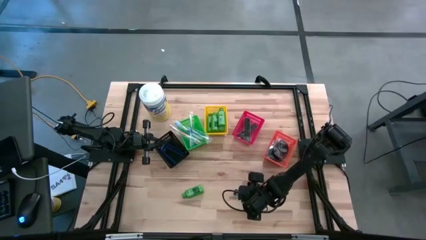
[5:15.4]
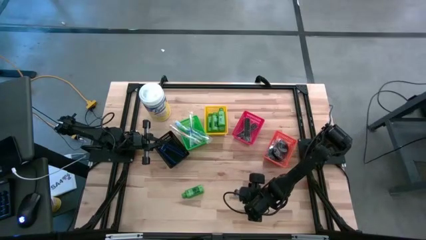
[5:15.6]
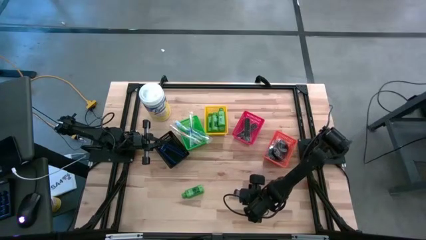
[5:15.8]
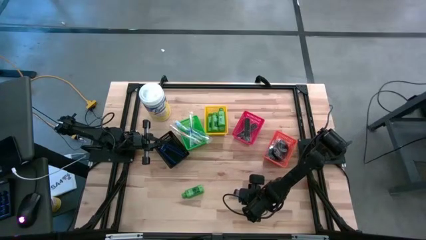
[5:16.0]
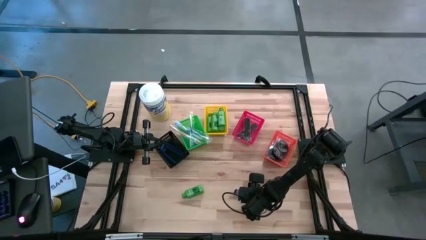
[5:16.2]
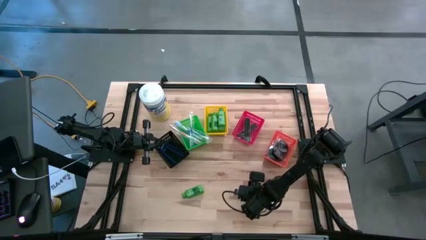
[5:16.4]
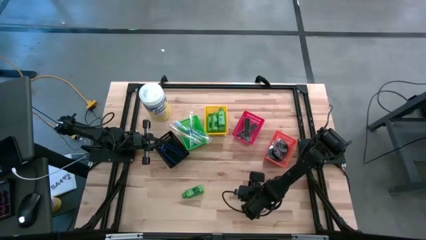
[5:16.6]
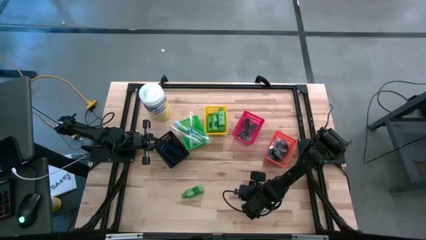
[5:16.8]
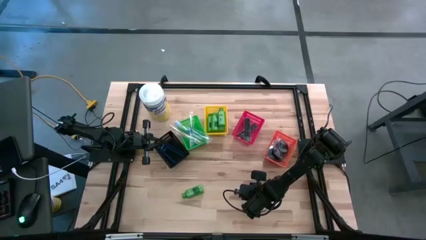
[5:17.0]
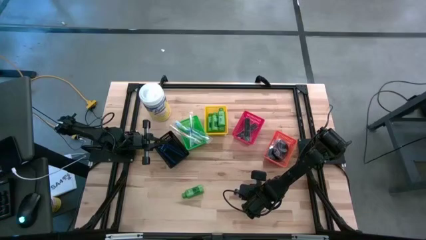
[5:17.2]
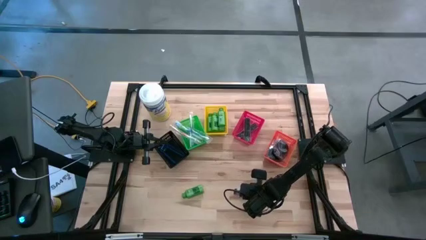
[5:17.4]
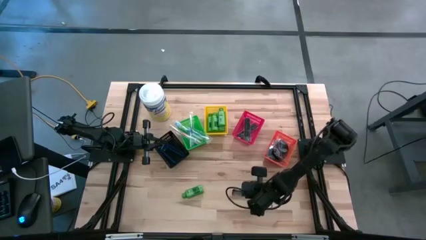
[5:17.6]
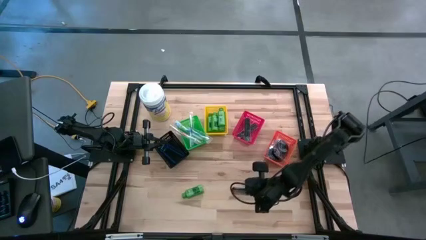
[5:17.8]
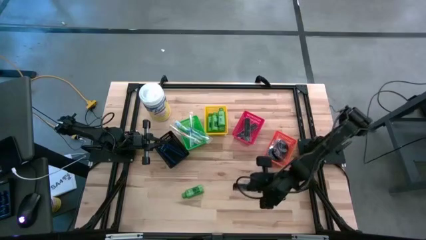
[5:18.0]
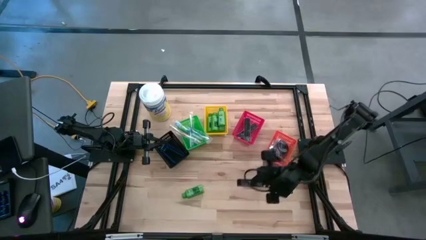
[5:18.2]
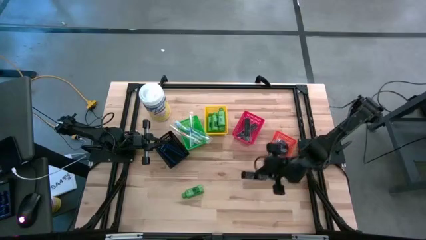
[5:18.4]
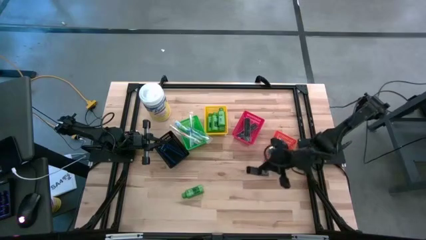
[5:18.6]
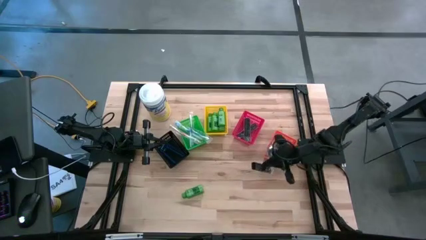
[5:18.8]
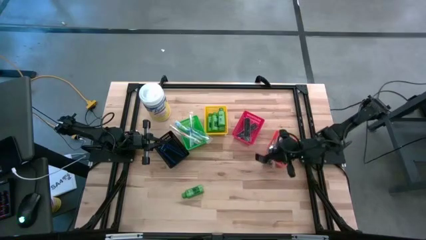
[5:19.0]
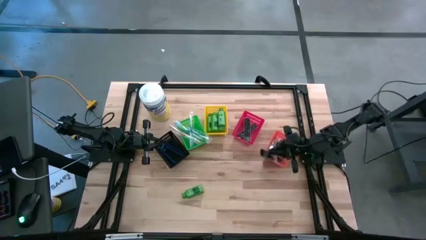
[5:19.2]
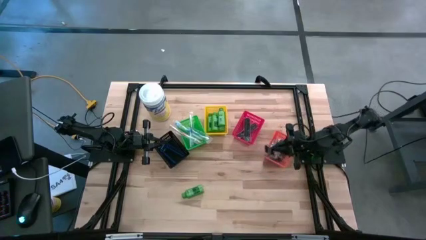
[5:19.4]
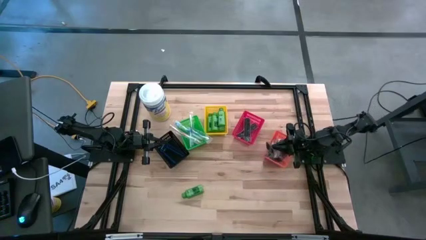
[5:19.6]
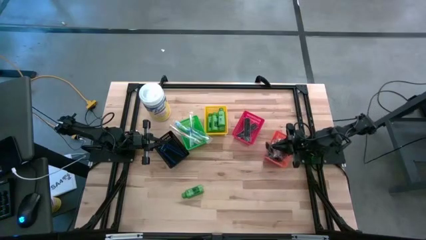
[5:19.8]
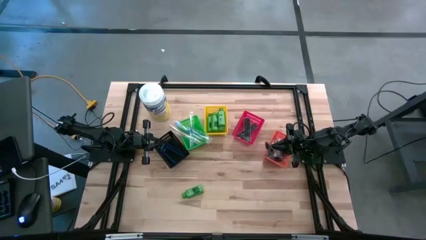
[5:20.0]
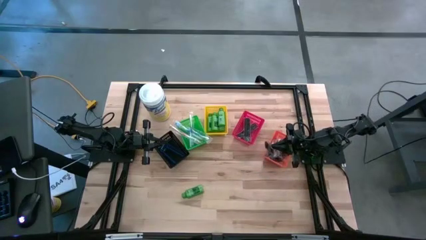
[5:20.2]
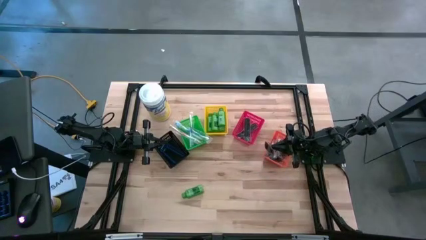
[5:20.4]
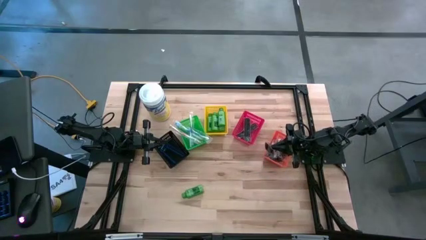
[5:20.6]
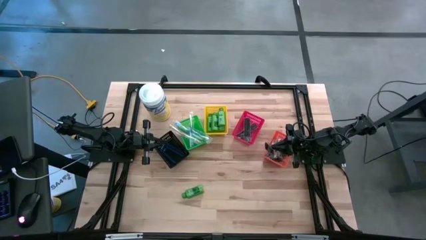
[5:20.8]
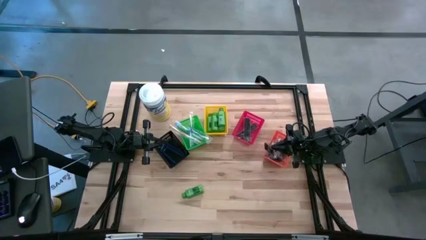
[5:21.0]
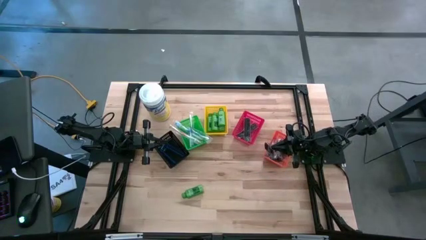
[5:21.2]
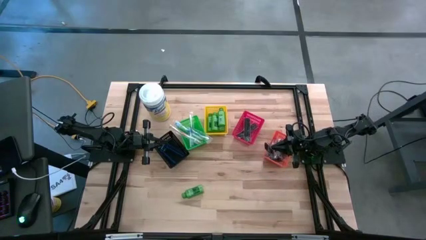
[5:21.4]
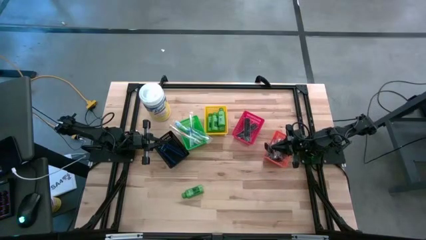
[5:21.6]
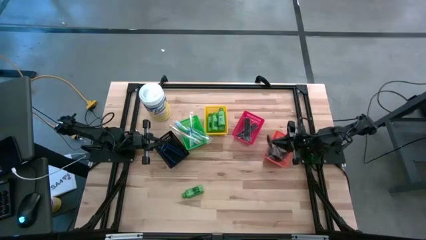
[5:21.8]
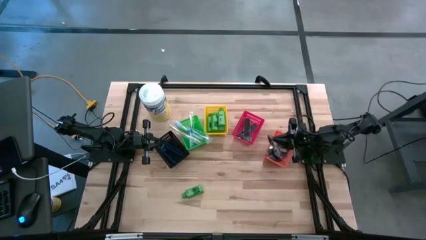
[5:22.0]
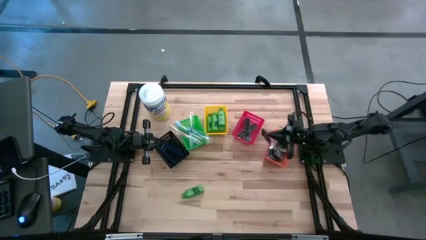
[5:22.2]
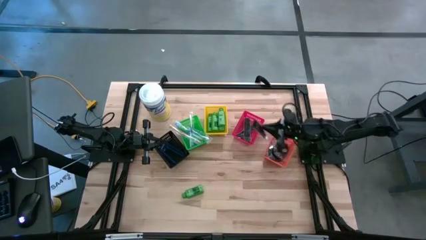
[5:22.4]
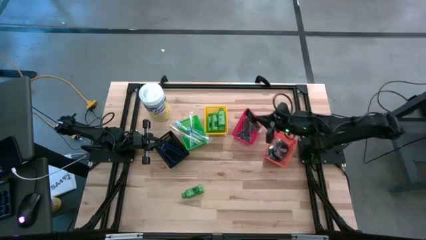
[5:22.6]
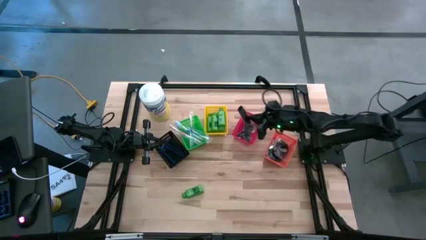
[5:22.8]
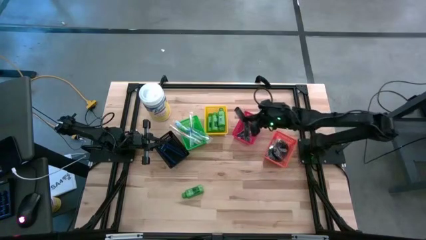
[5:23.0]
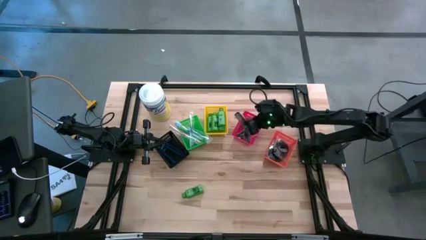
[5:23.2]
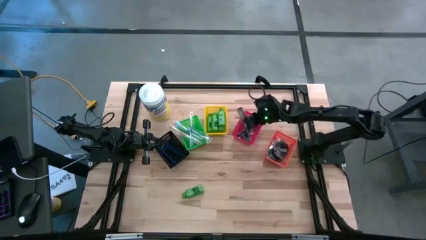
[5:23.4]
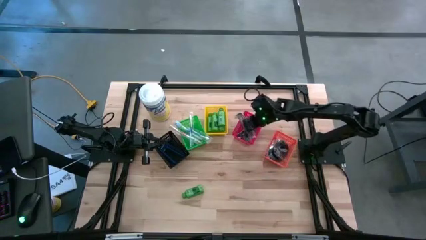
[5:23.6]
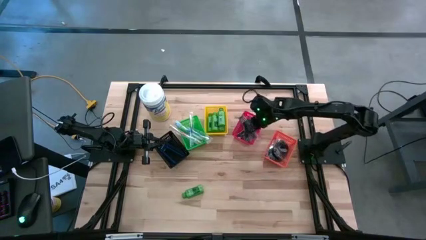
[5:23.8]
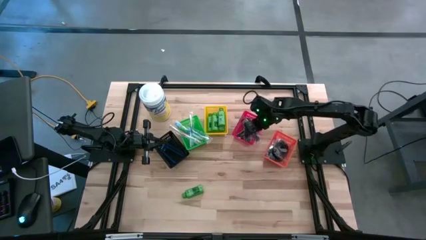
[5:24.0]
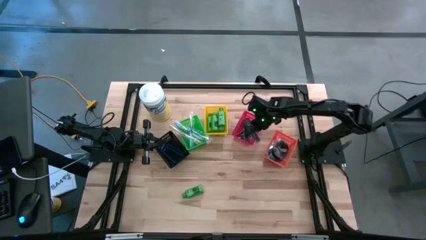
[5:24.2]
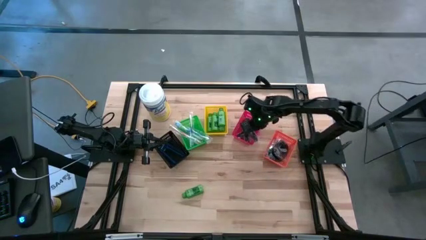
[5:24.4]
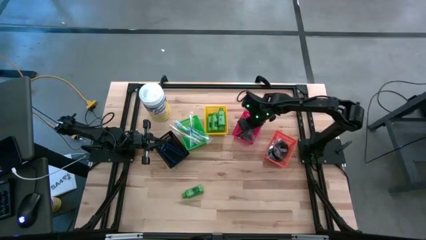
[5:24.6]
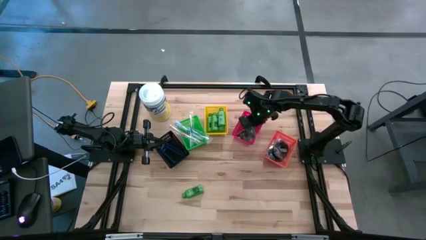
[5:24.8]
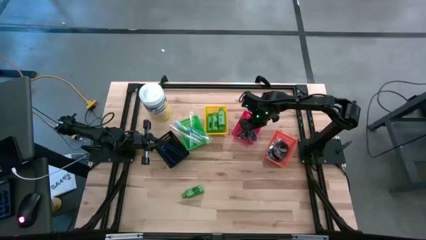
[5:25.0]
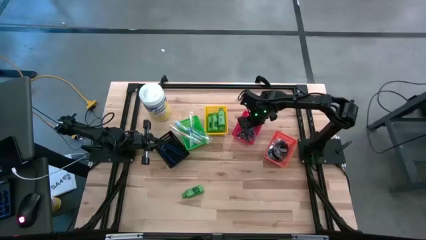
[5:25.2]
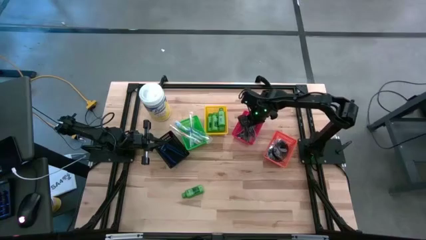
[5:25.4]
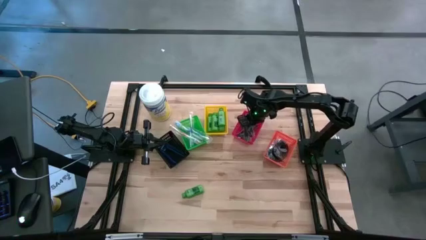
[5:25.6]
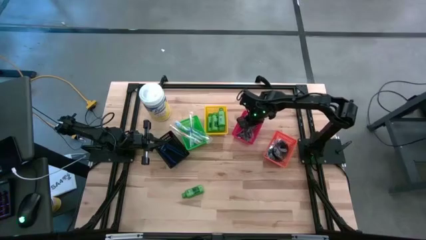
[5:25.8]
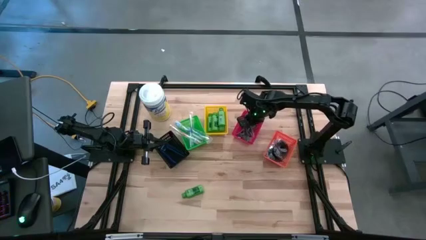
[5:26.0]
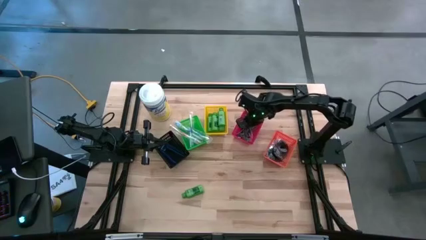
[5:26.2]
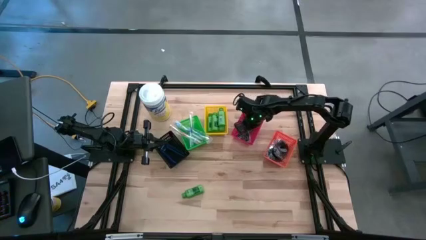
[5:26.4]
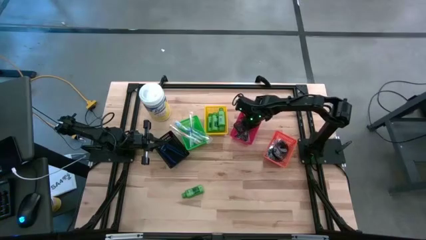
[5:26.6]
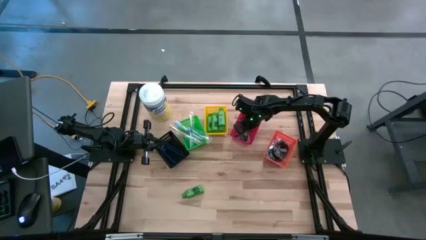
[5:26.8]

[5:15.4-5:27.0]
Task: Pick & Place Travel size toiletries
Put the black hair comb into the red bin
